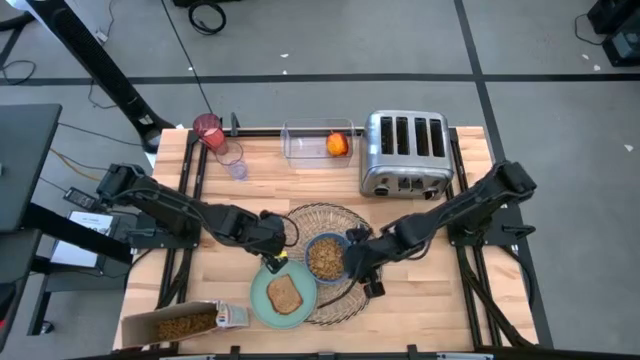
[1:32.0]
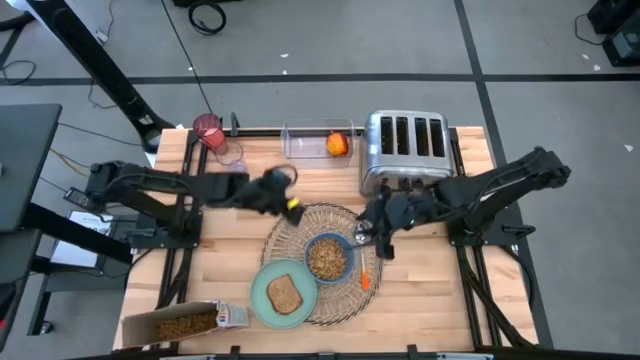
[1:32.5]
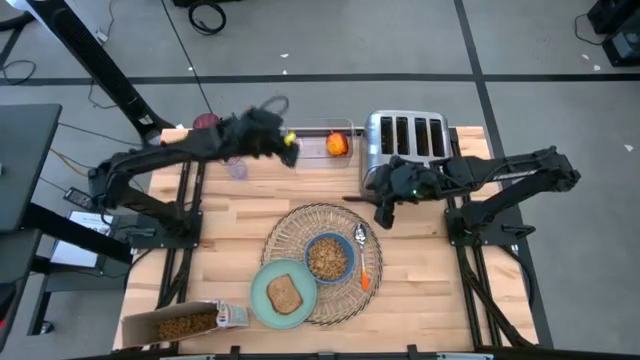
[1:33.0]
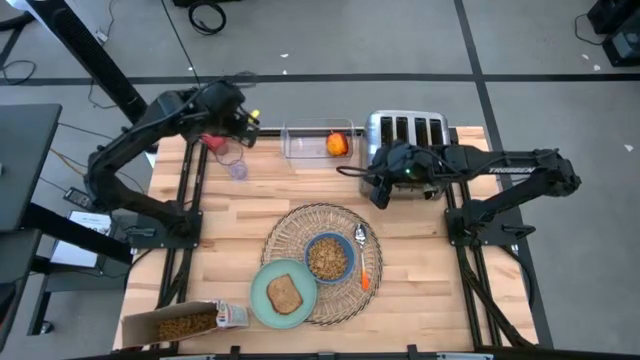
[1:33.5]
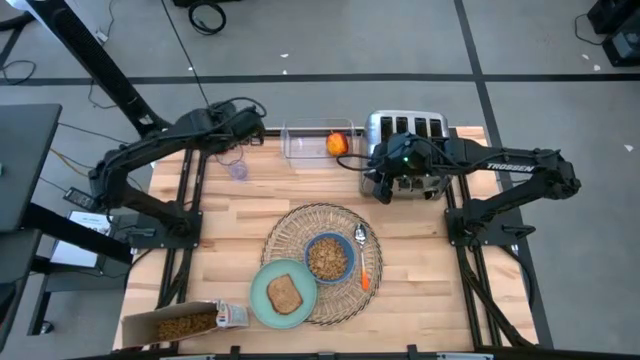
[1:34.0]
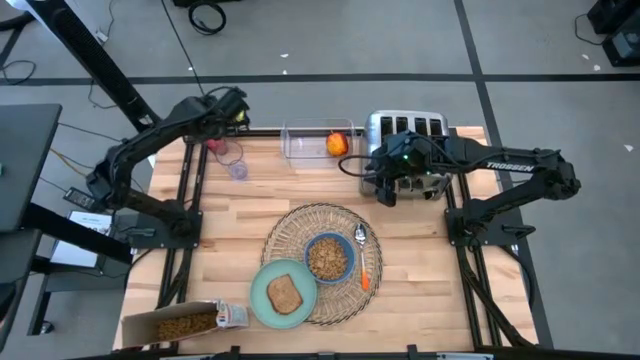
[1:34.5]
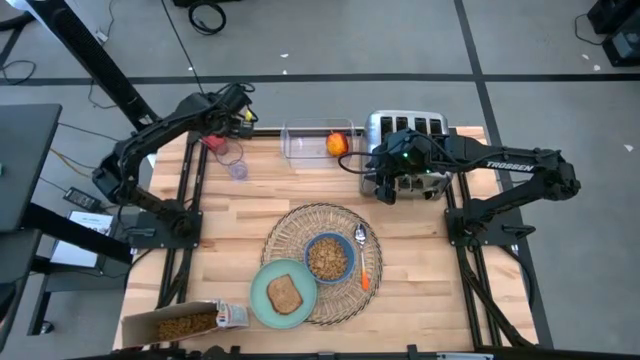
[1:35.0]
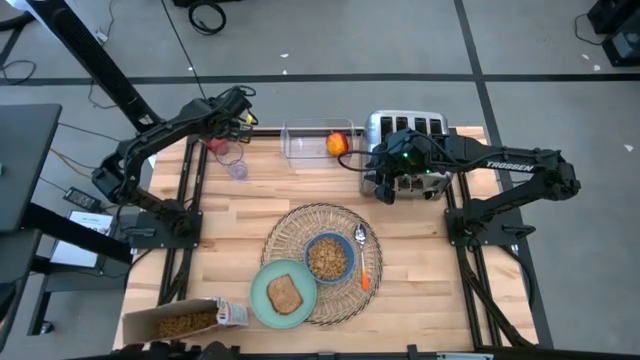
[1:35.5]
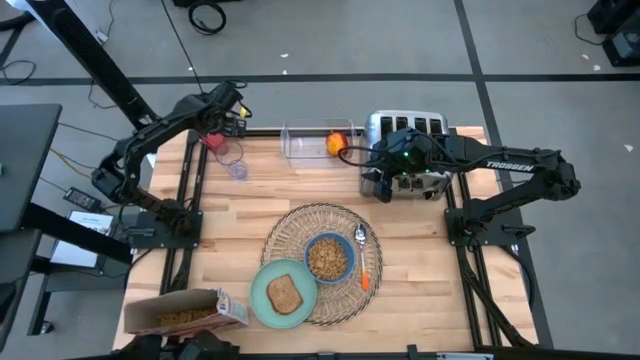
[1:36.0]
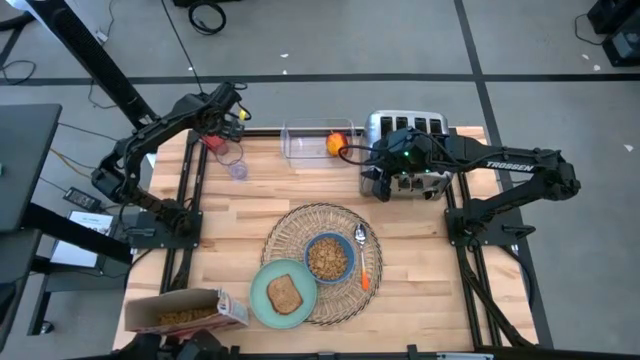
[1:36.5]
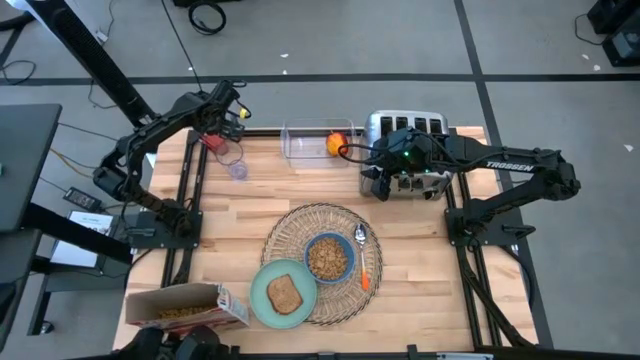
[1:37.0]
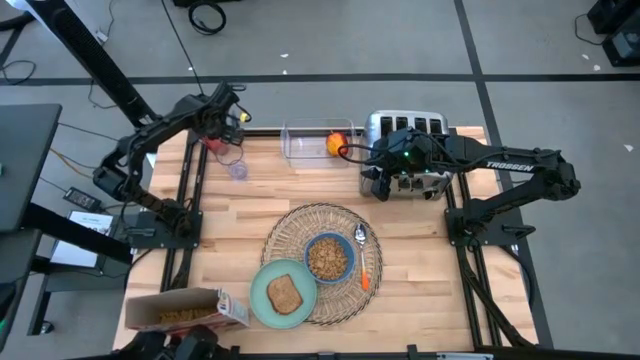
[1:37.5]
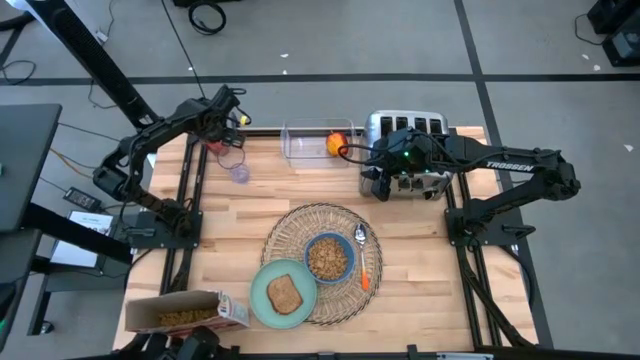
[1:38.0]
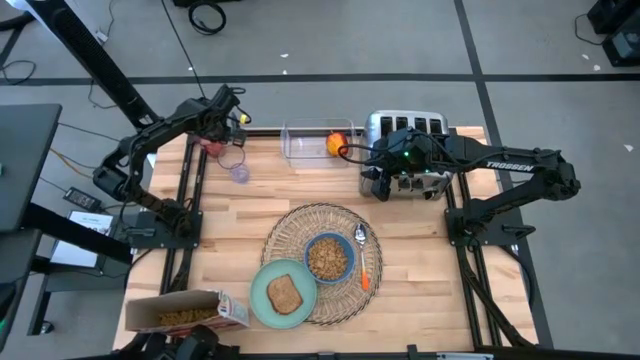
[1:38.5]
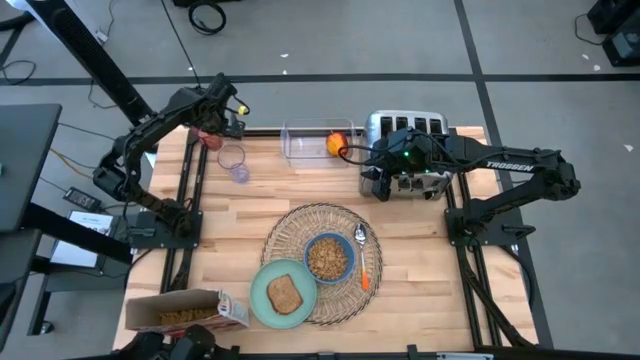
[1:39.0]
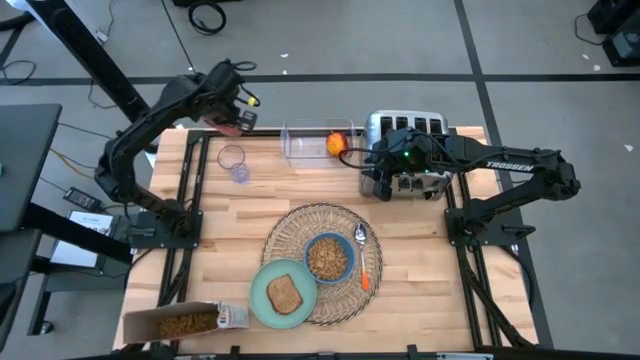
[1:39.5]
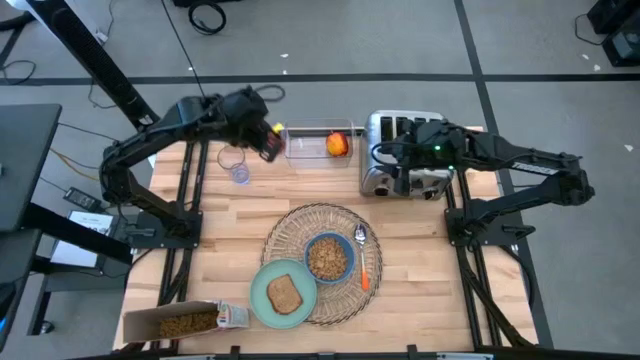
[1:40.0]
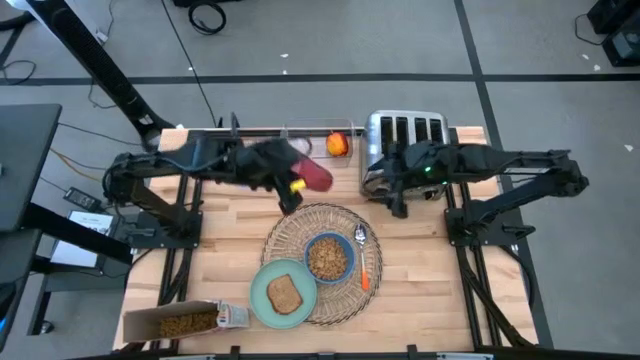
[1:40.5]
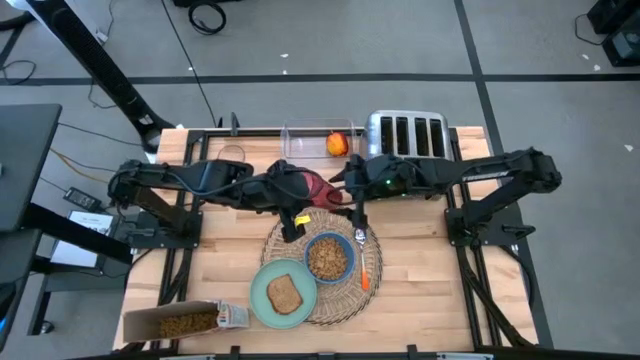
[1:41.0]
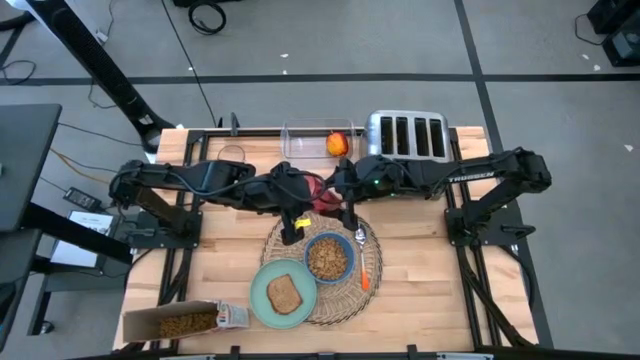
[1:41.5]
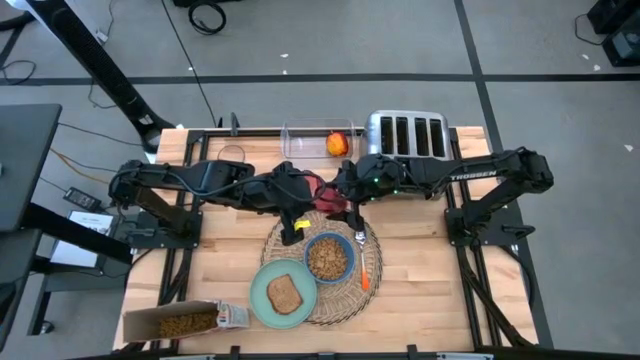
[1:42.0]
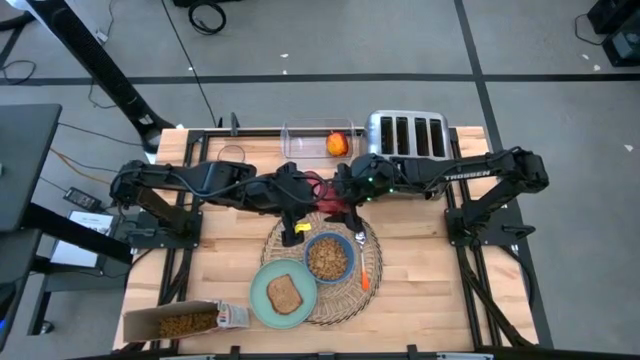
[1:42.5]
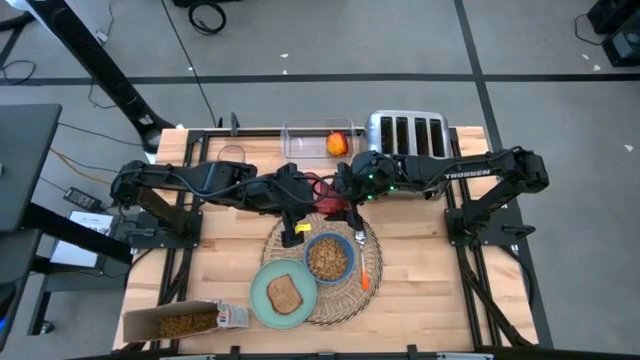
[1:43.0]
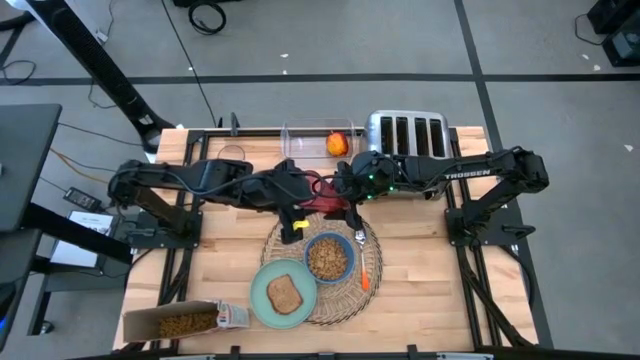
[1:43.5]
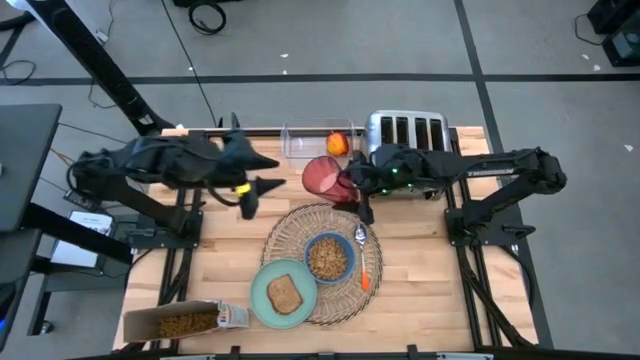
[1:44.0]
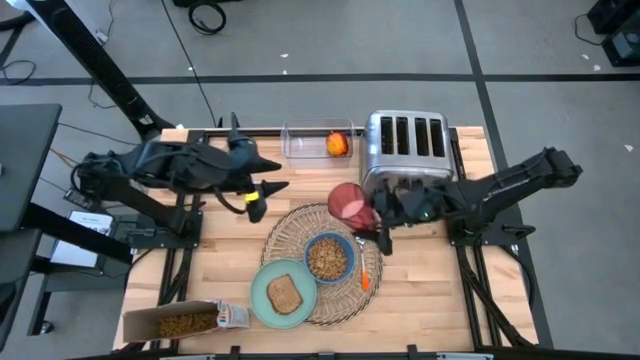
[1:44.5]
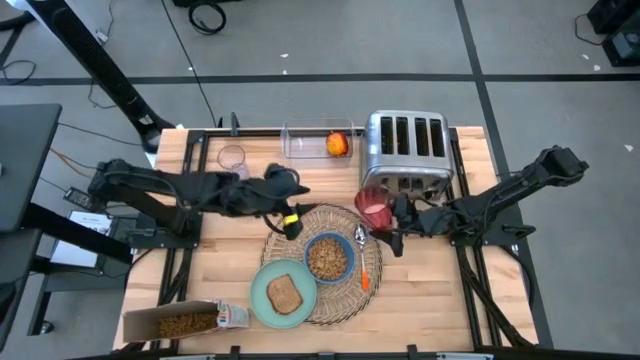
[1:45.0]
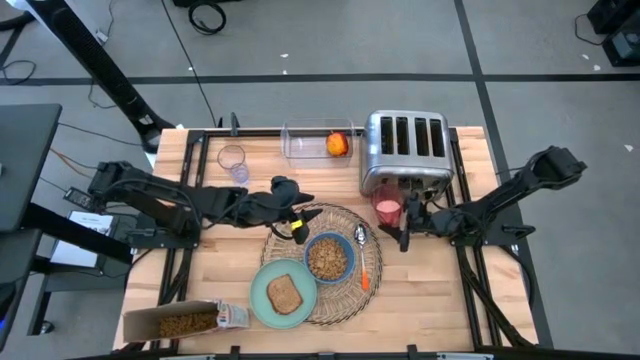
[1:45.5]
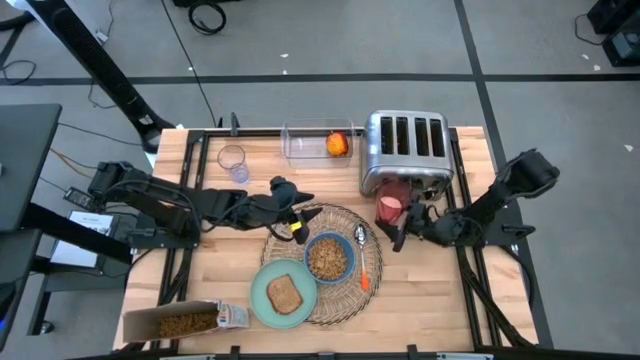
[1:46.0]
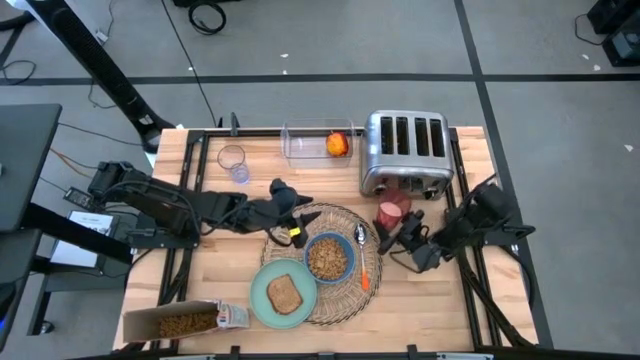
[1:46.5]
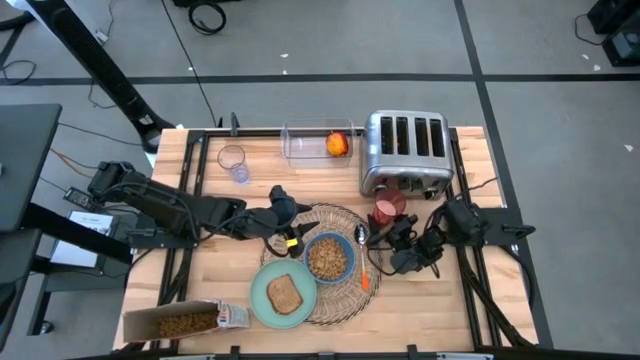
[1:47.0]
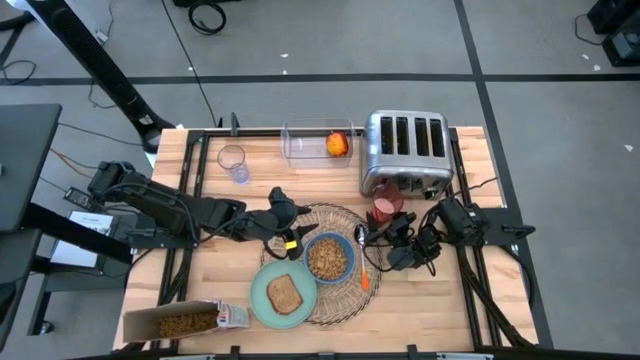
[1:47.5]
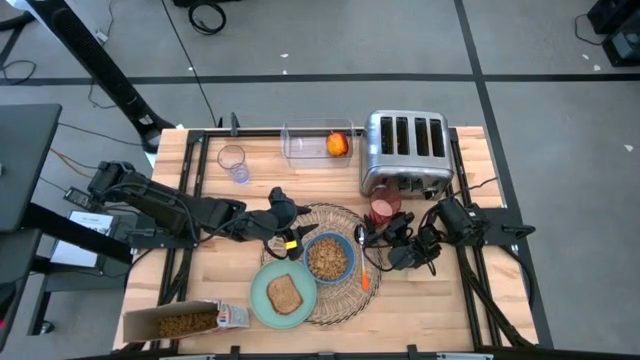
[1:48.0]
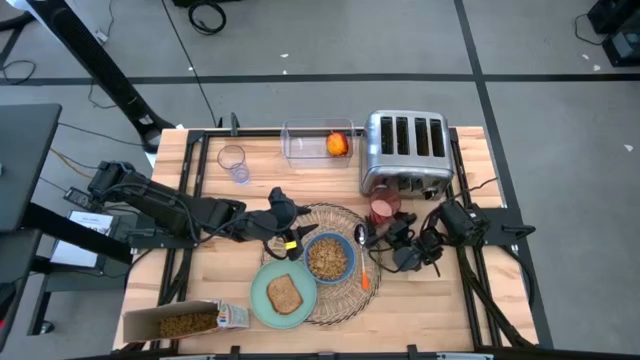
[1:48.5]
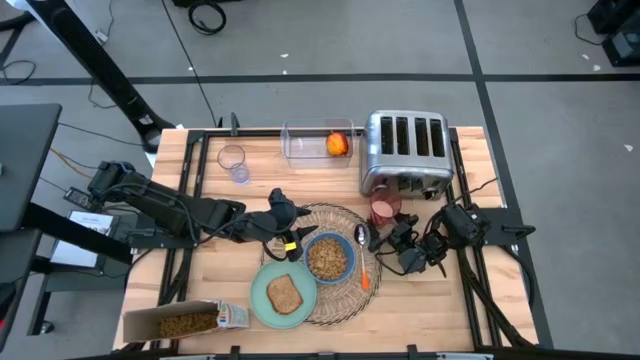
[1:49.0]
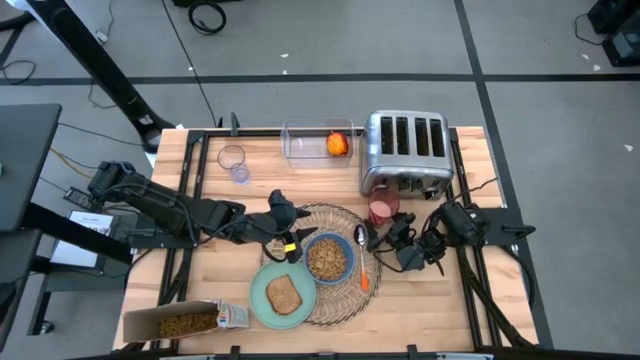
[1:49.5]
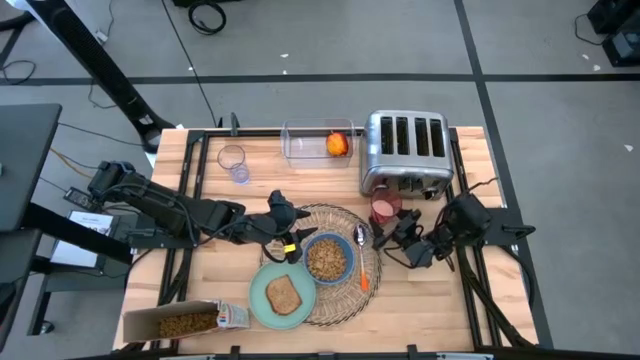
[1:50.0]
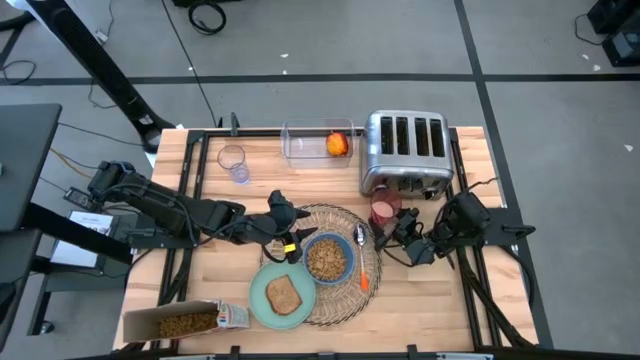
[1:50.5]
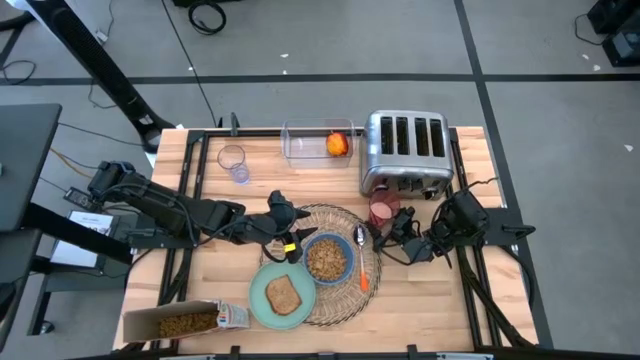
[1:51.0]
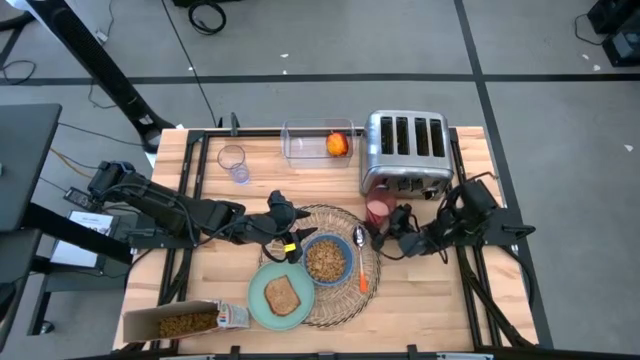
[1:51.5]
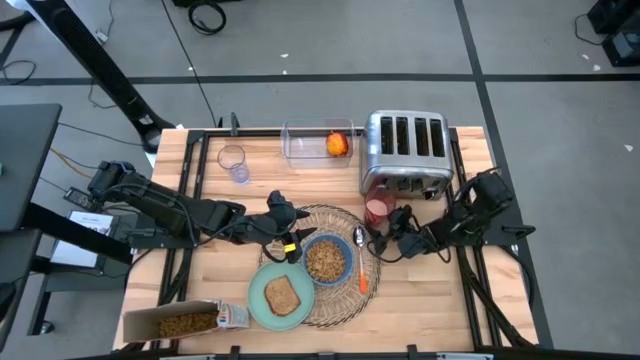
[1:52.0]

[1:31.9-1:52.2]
Task: Arrange a breakfast setting
Put the red cup of milk to the top right of the brown placemat

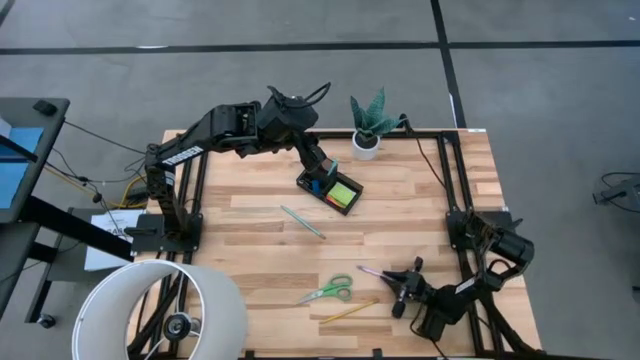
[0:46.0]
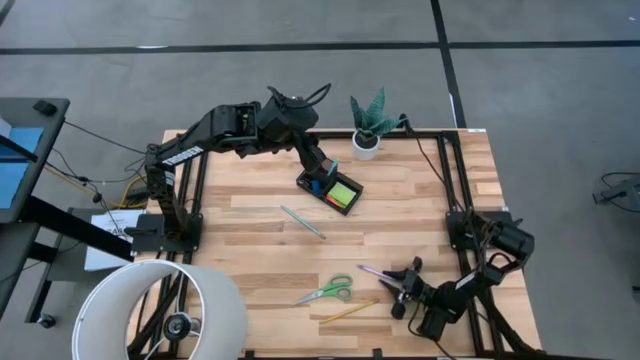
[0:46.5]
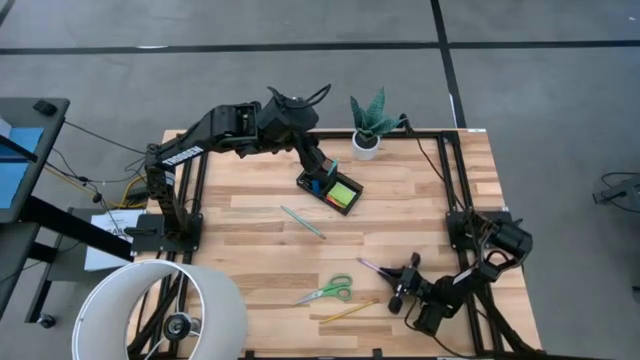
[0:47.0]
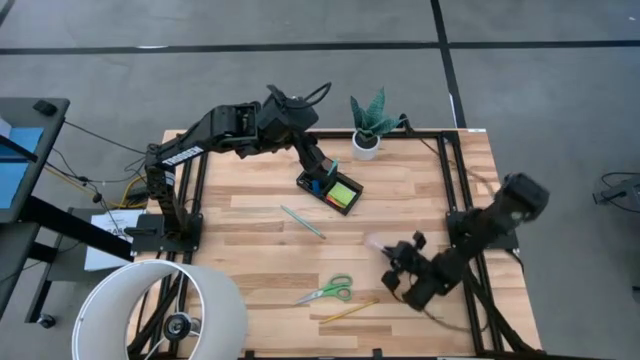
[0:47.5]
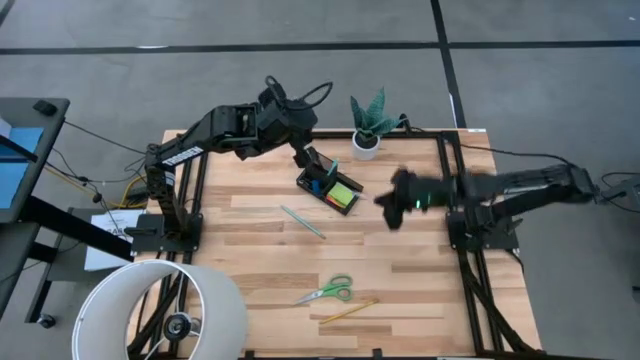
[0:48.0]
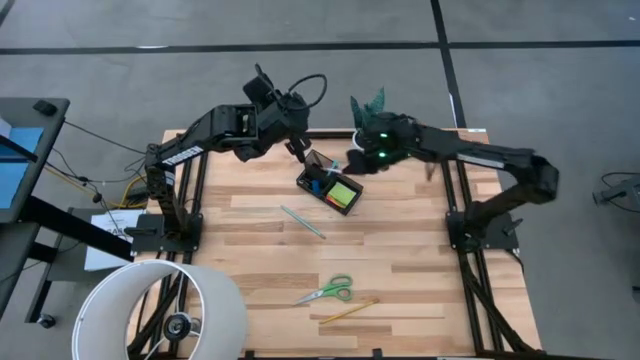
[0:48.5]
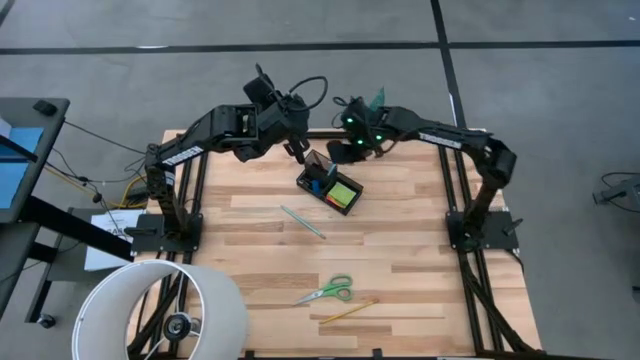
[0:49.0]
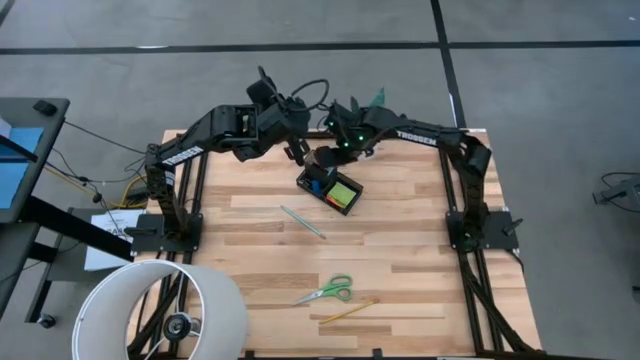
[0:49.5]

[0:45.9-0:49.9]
Task: Pick and place office supplies into organizer
Put the purple ballpen into the black desk organizer
